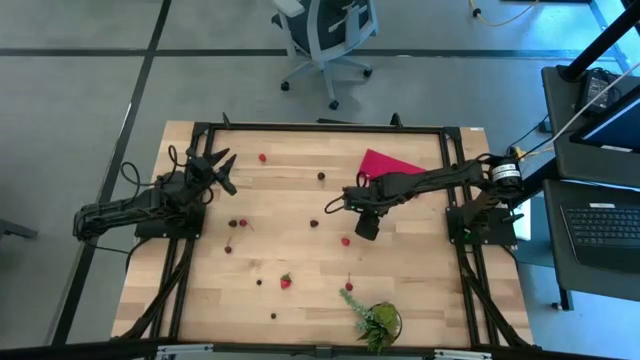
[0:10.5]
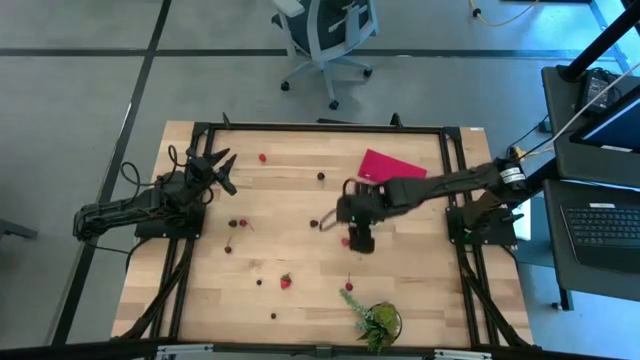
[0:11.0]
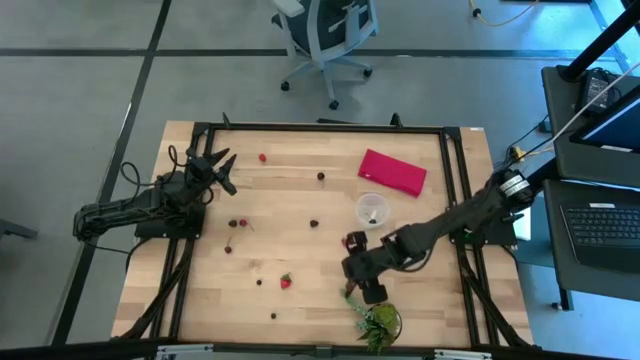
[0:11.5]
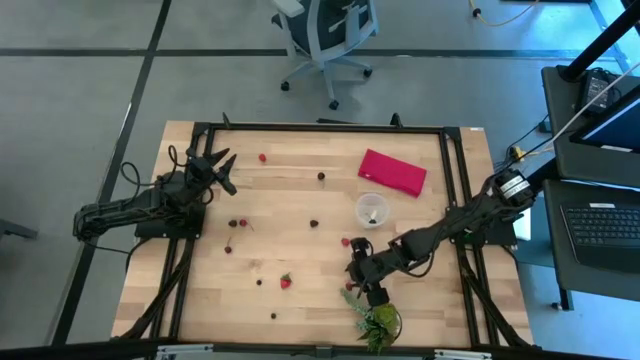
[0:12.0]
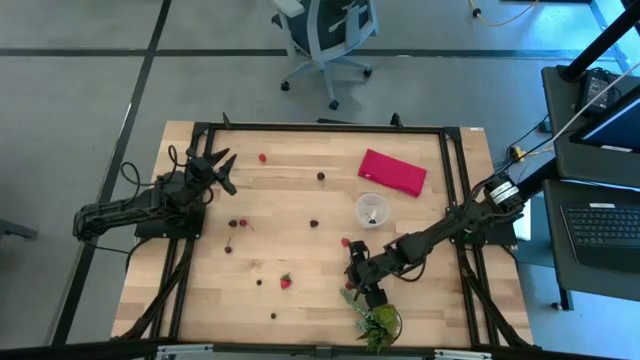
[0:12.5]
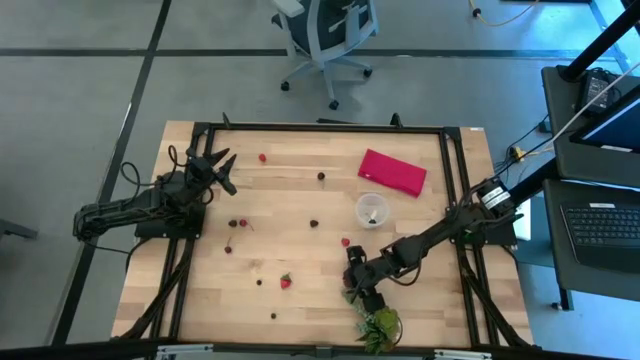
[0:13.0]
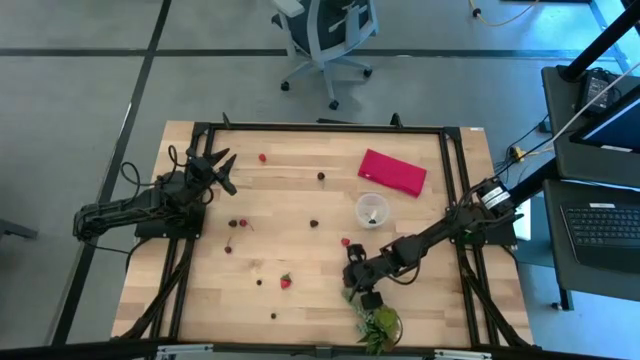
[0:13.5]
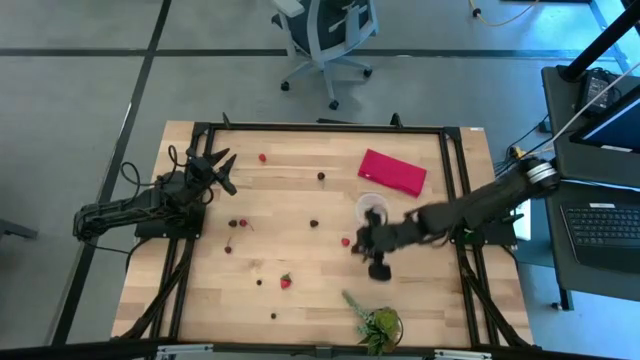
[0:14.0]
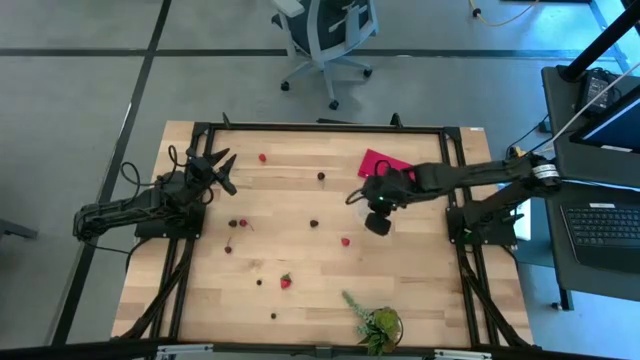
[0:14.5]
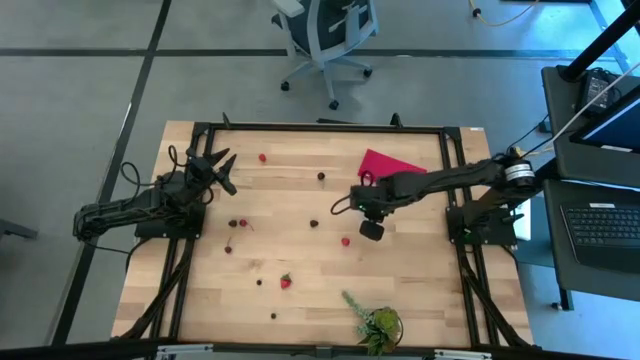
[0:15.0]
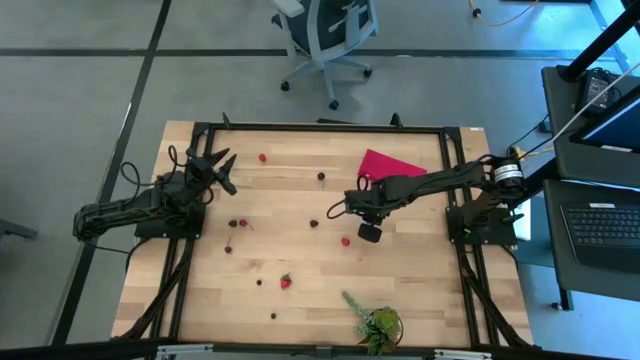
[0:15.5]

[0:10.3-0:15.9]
Task: Pick and placing Produce into tupperware
Put the bottom red cherry into the transparent container

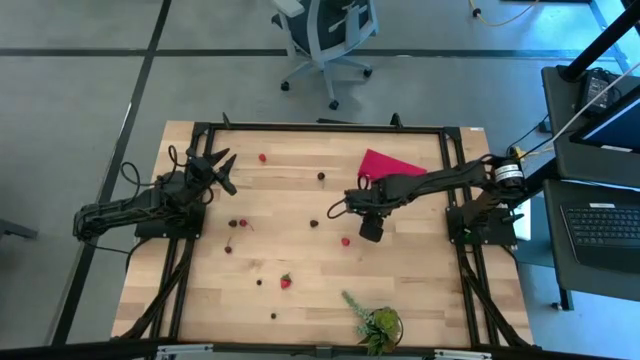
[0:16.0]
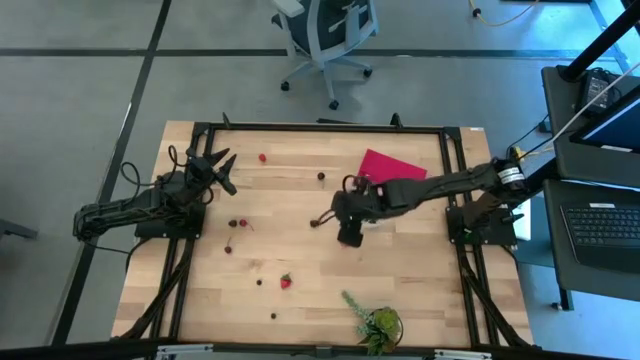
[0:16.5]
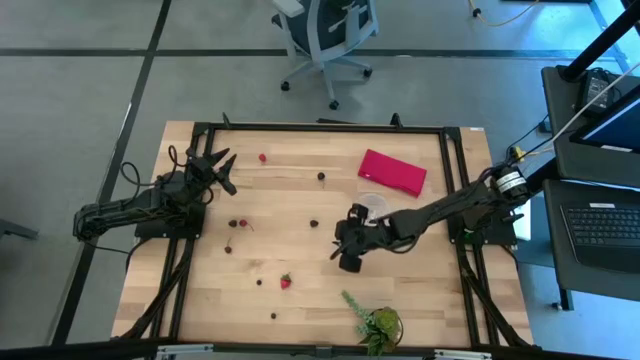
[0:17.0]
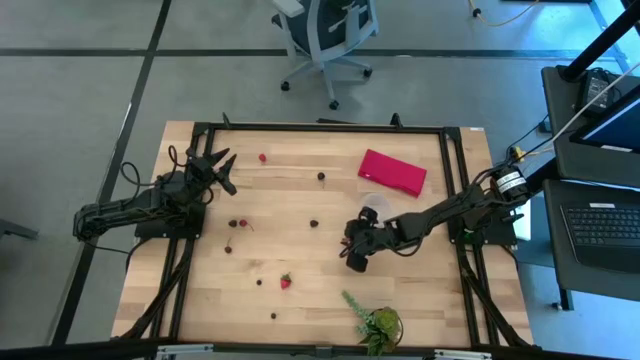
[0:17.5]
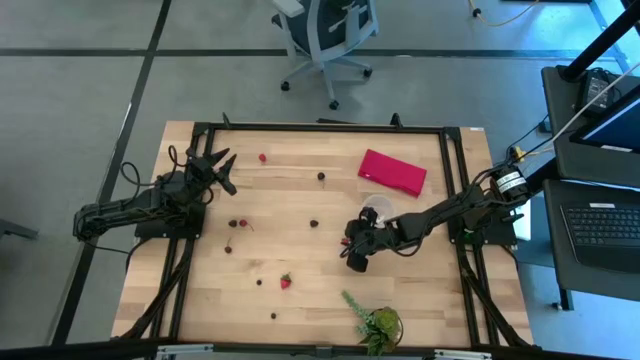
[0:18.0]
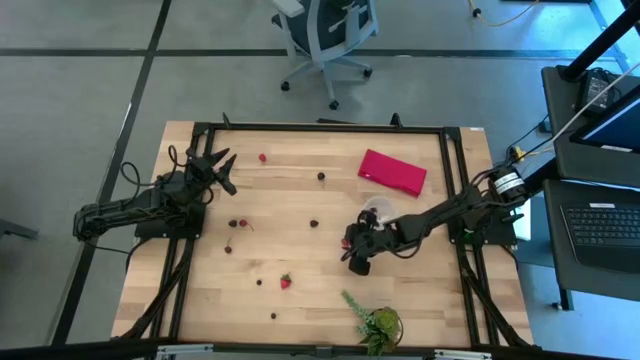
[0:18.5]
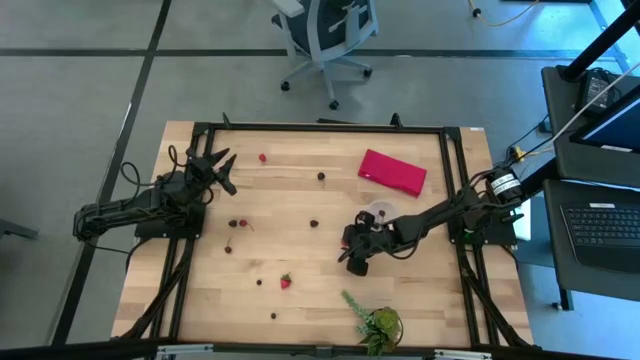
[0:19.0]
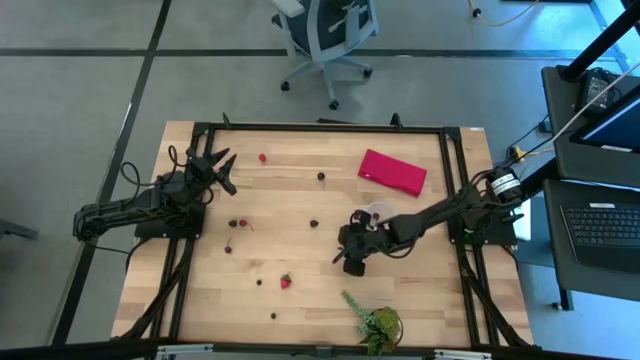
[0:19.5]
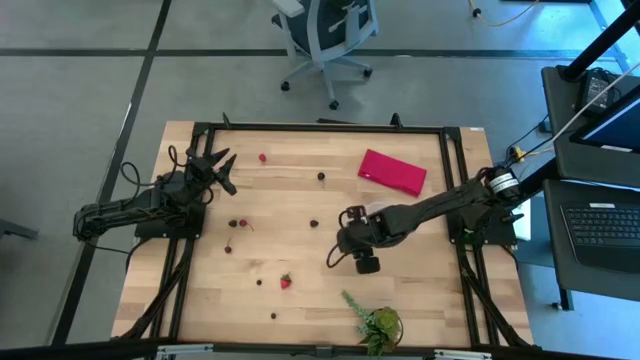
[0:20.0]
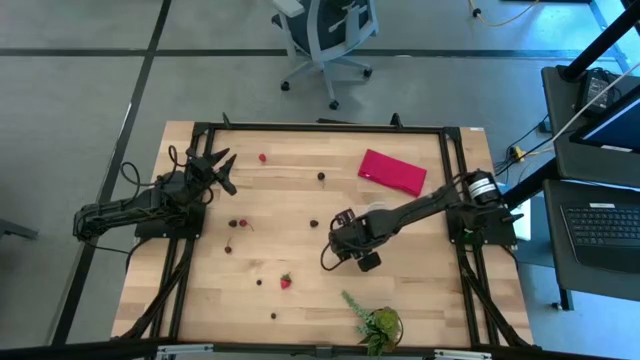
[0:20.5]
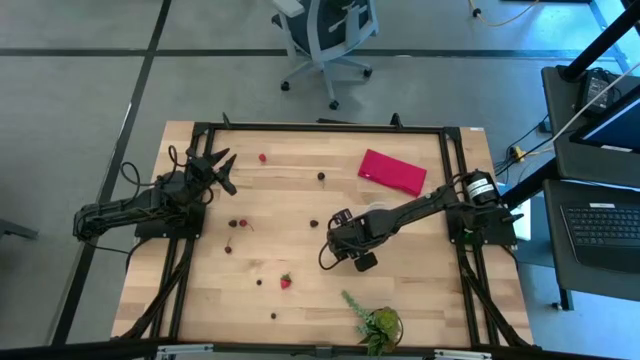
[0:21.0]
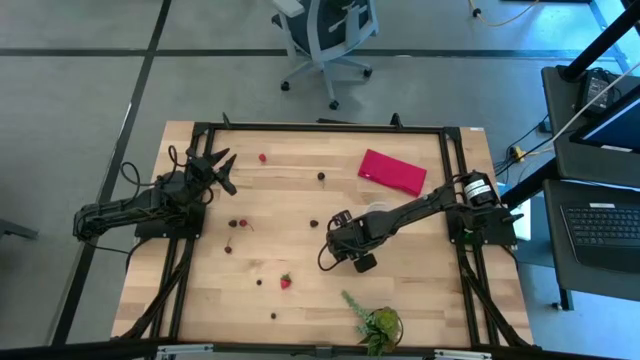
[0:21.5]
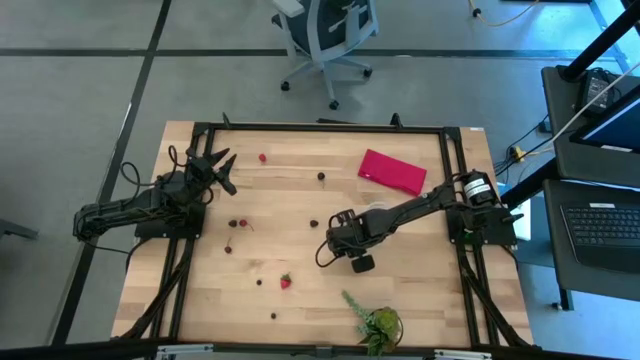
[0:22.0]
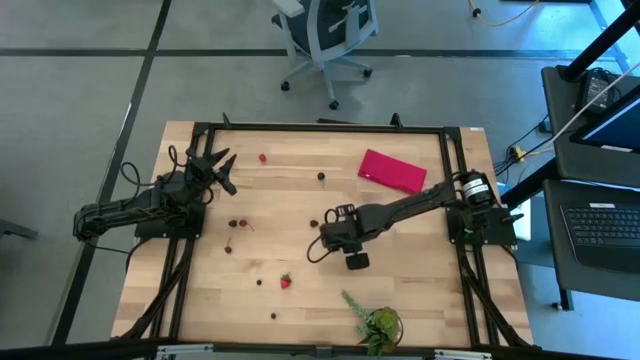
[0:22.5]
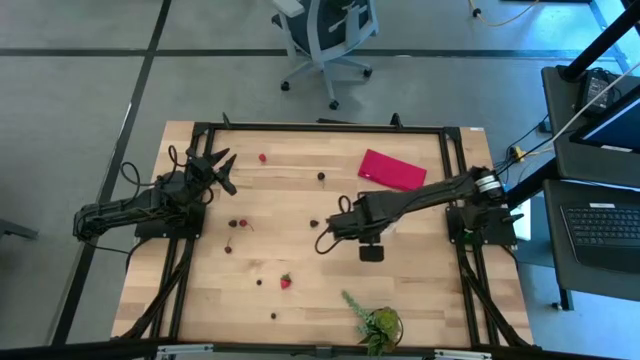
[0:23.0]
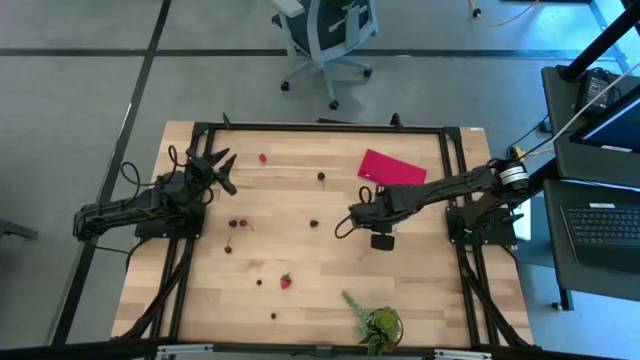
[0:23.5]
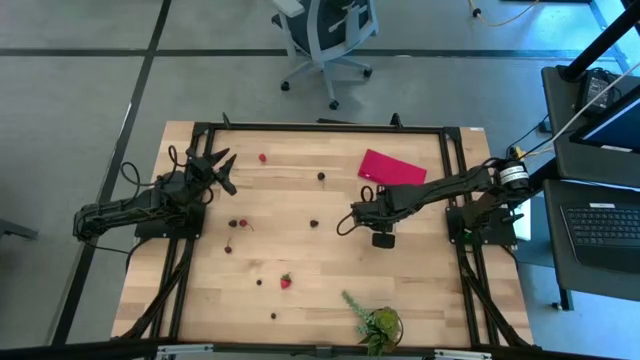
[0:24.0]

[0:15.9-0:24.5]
Put the bottom red raspberry into the transparent container

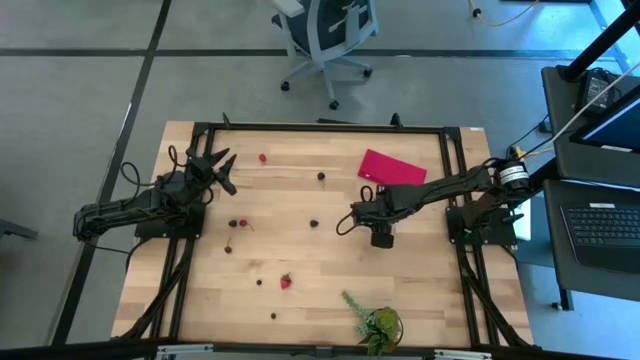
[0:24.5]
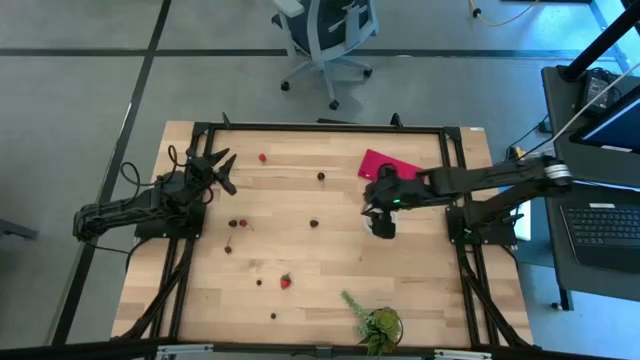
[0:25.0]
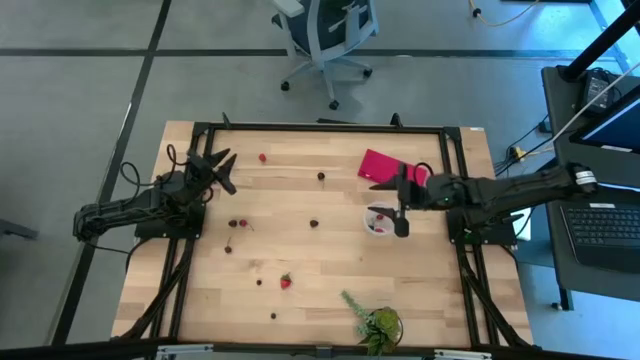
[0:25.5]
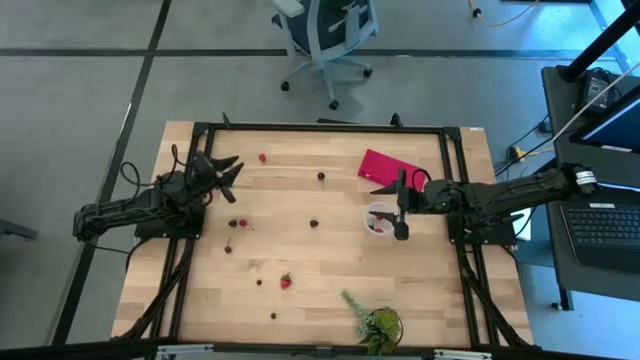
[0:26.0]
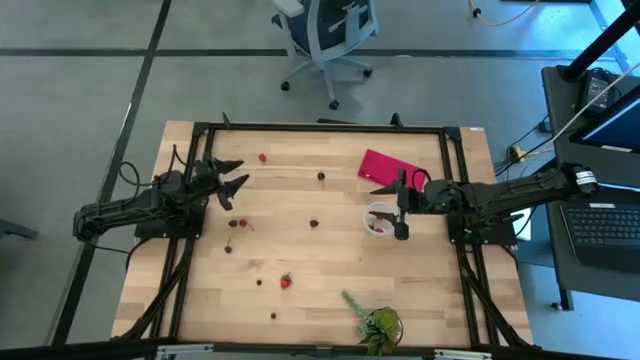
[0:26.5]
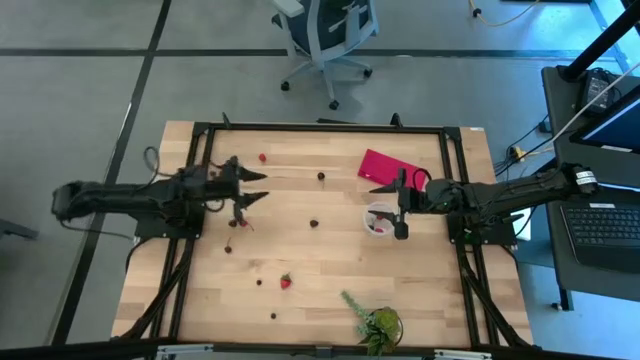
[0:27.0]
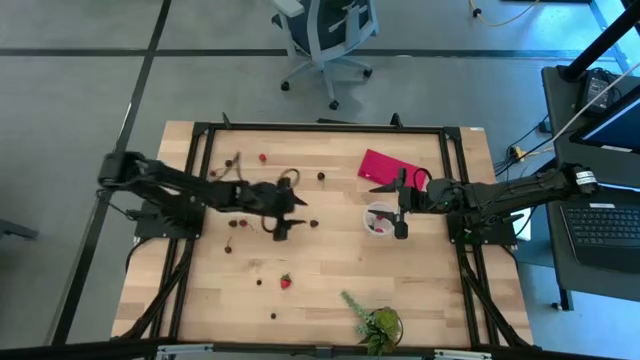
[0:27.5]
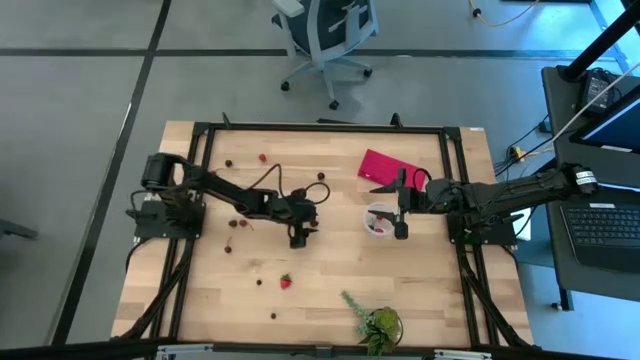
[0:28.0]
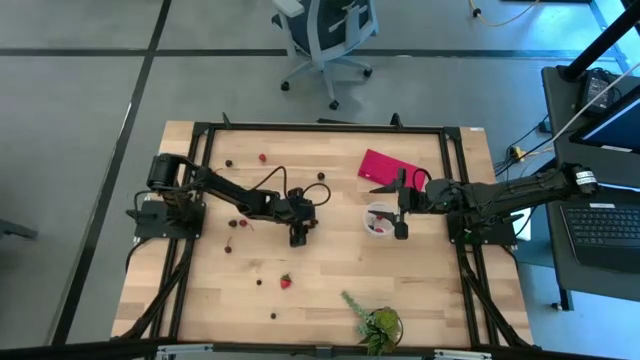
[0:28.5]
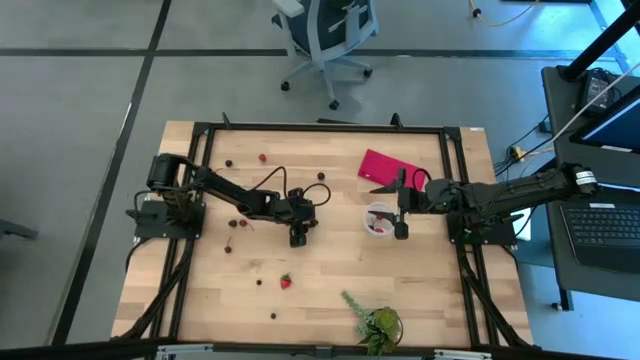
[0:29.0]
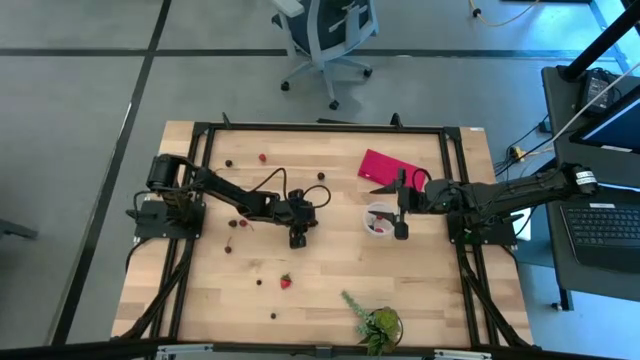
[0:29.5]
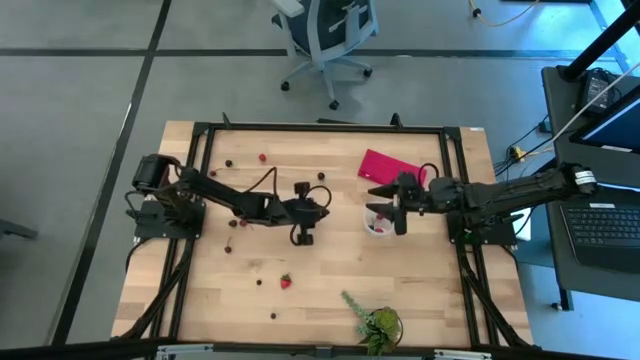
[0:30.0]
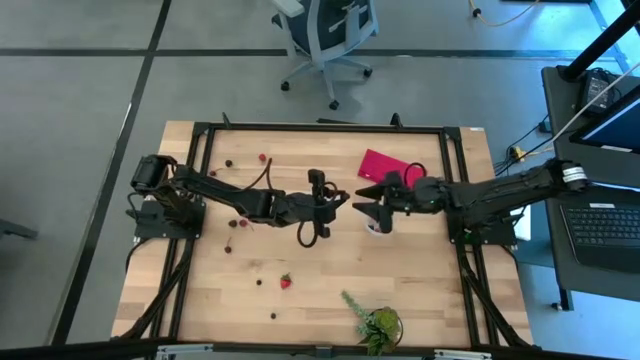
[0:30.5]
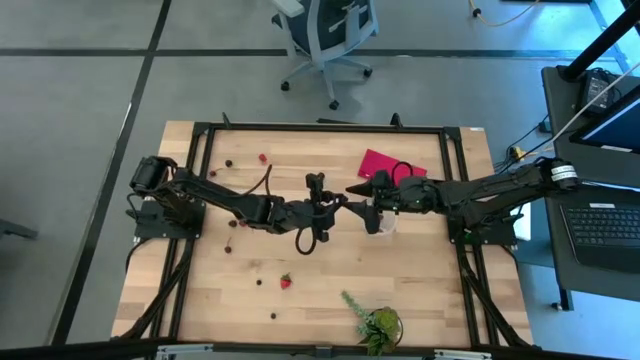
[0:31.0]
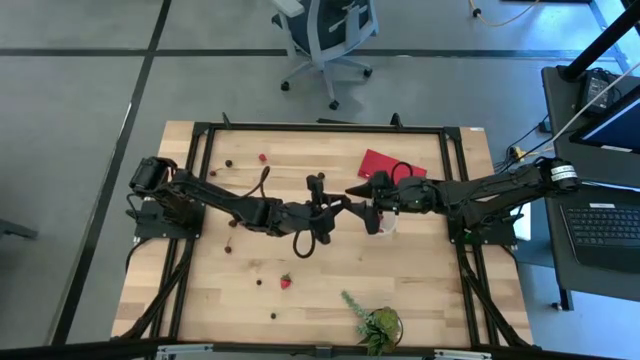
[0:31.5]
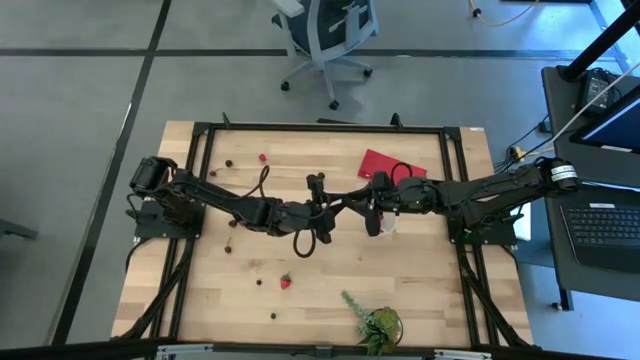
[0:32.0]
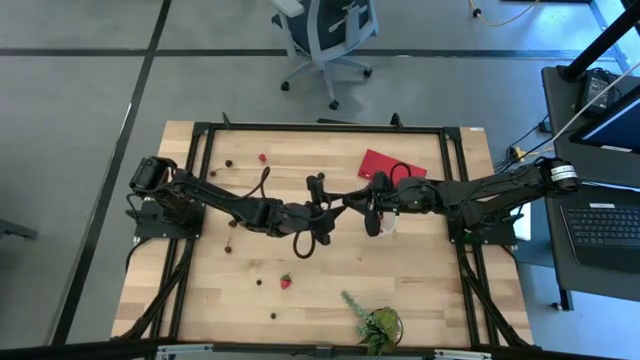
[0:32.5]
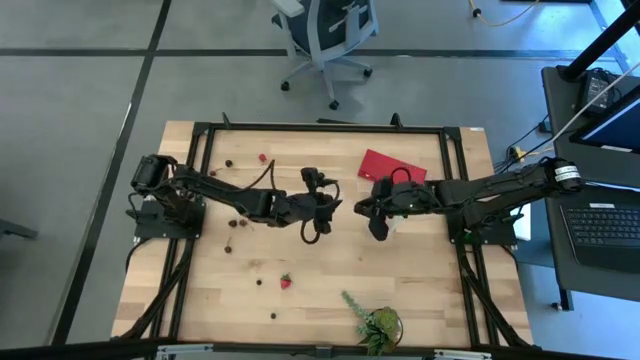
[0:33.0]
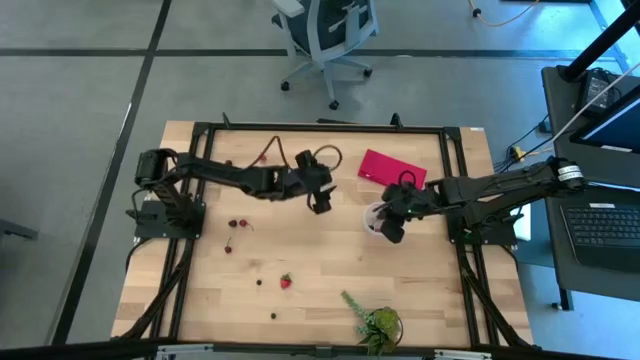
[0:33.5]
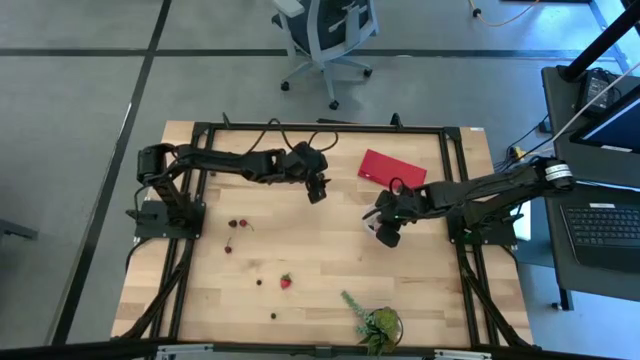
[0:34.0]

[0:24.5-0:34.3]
Put the right blackberry into the transparent container
